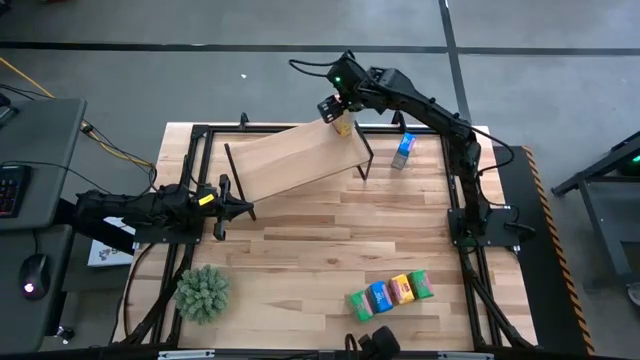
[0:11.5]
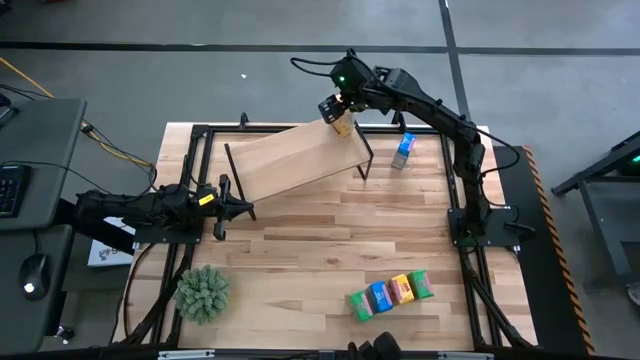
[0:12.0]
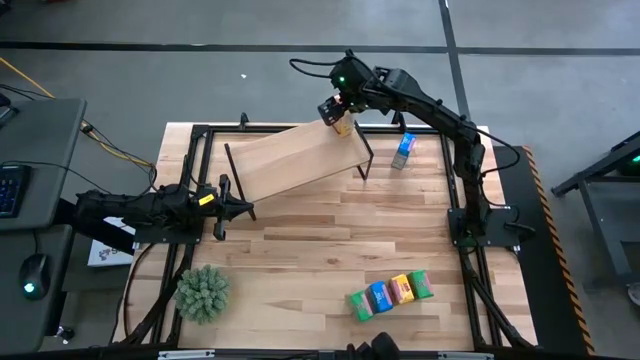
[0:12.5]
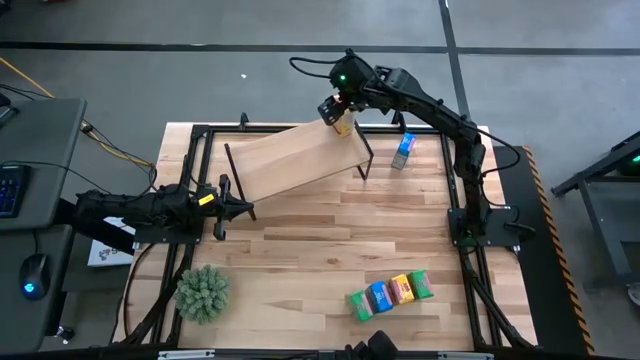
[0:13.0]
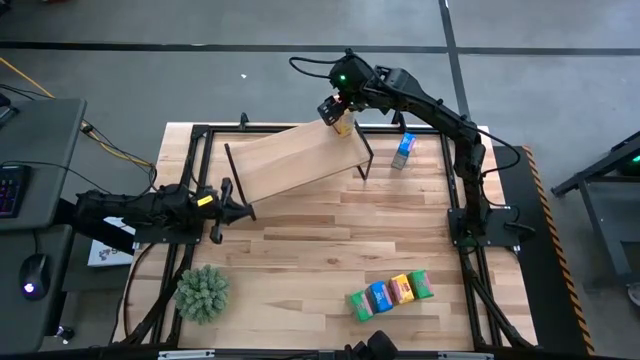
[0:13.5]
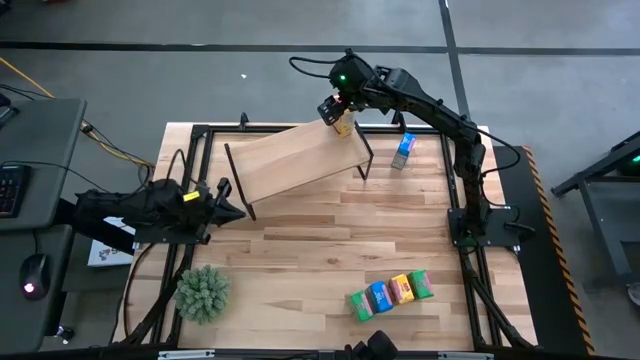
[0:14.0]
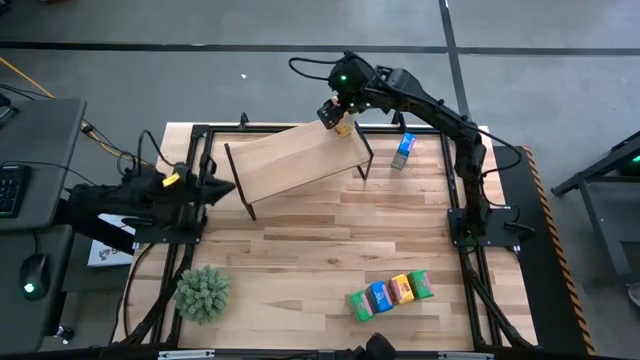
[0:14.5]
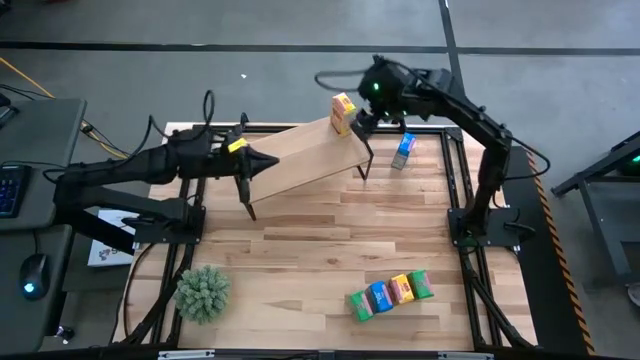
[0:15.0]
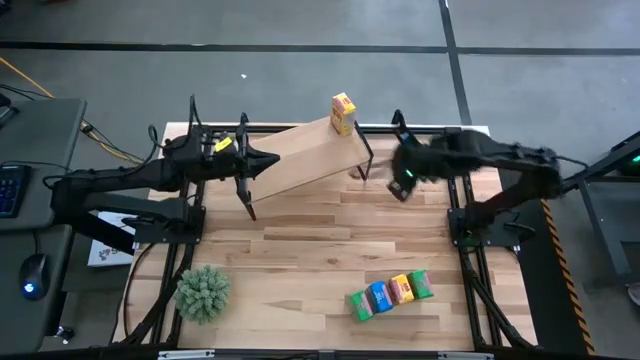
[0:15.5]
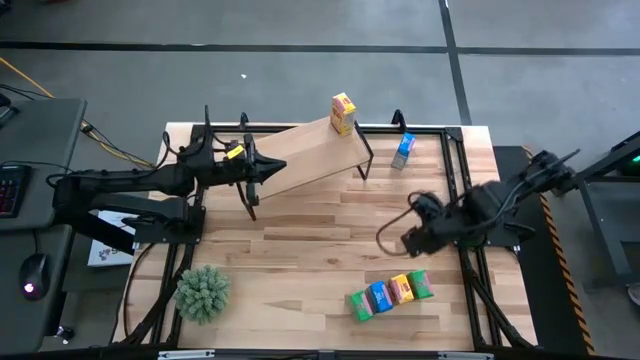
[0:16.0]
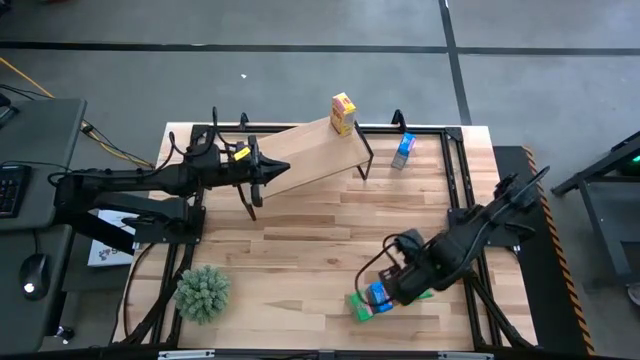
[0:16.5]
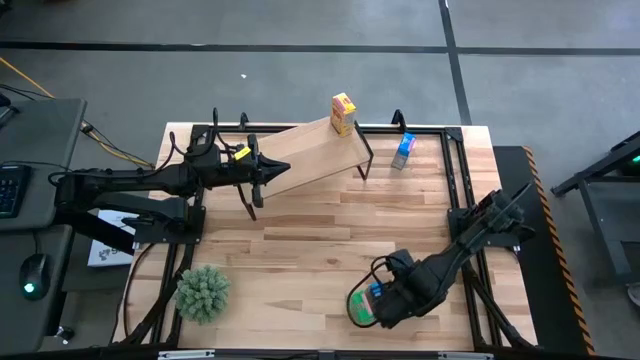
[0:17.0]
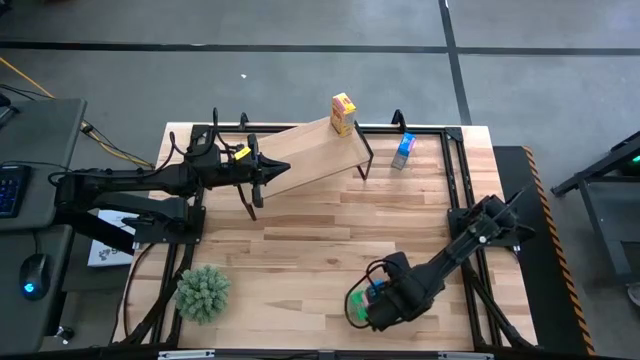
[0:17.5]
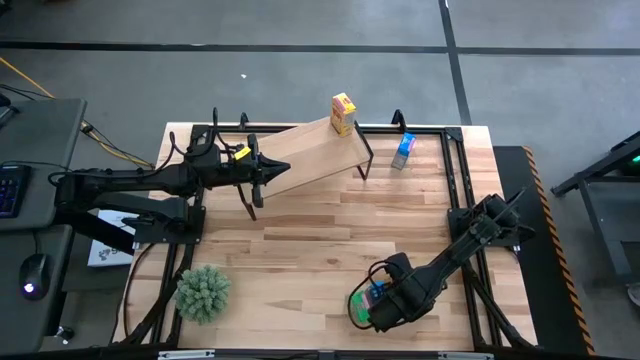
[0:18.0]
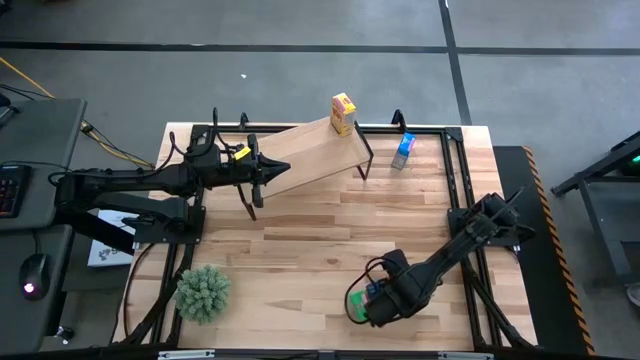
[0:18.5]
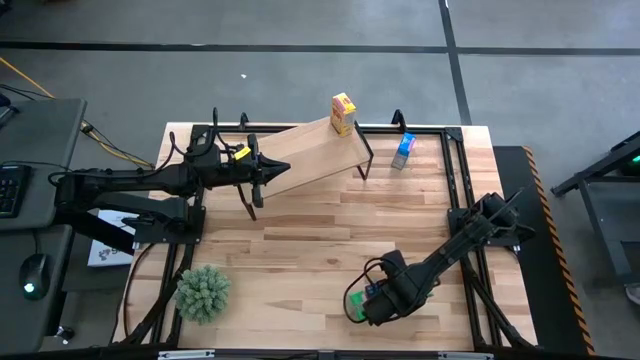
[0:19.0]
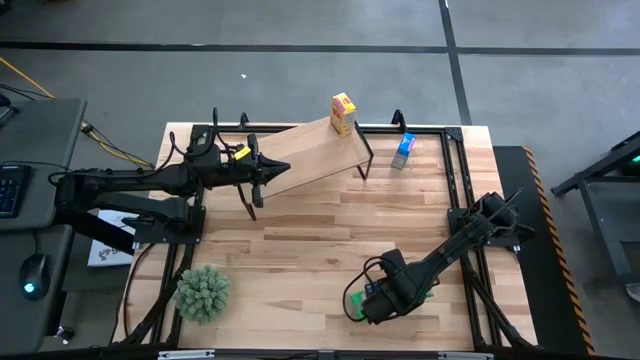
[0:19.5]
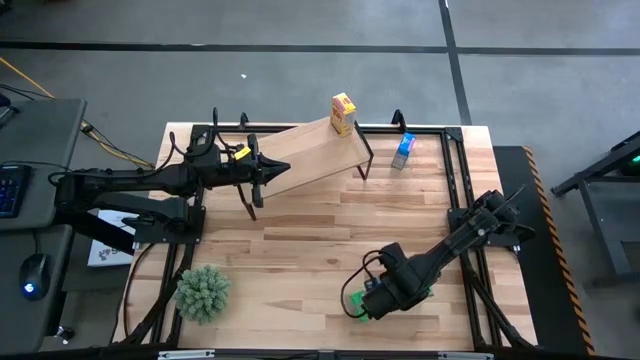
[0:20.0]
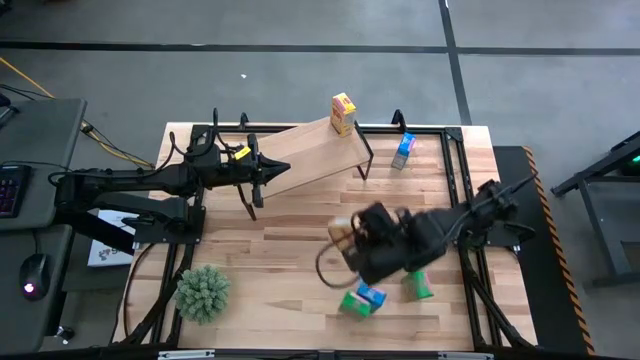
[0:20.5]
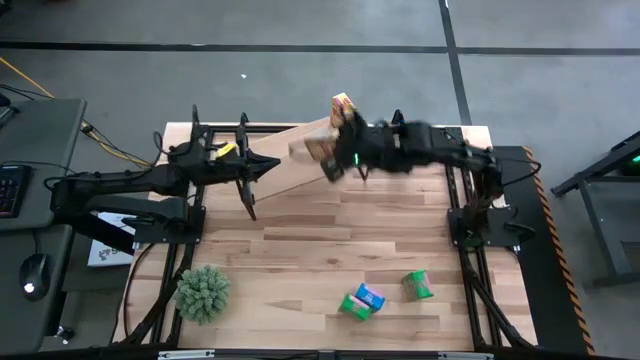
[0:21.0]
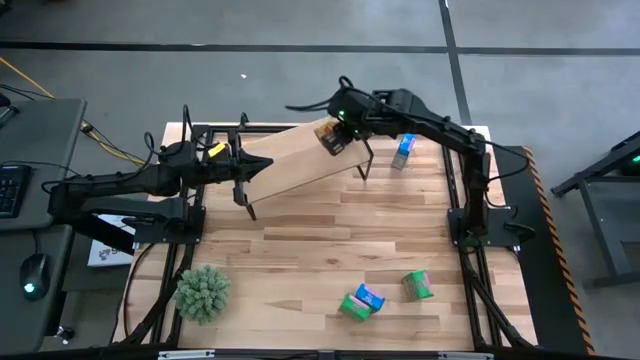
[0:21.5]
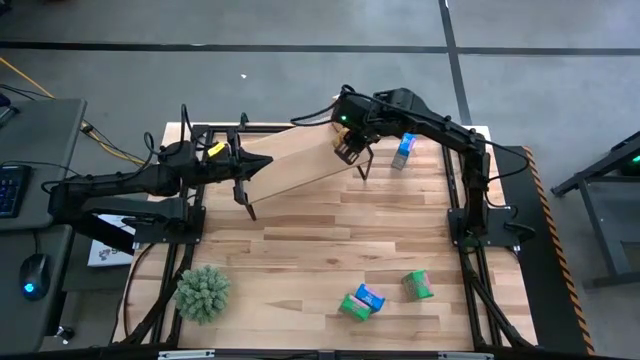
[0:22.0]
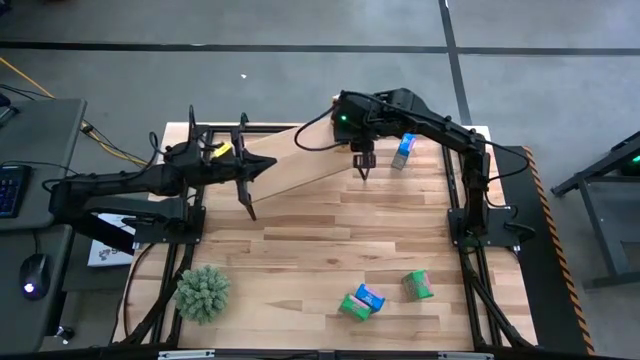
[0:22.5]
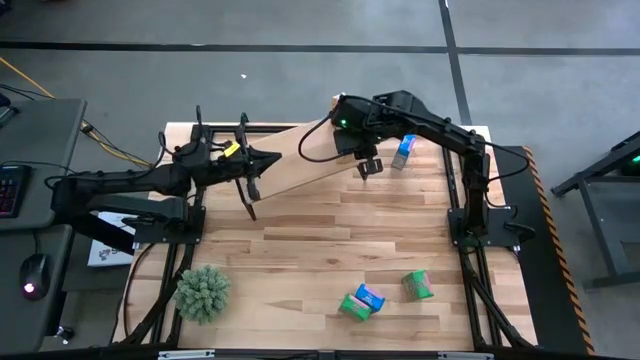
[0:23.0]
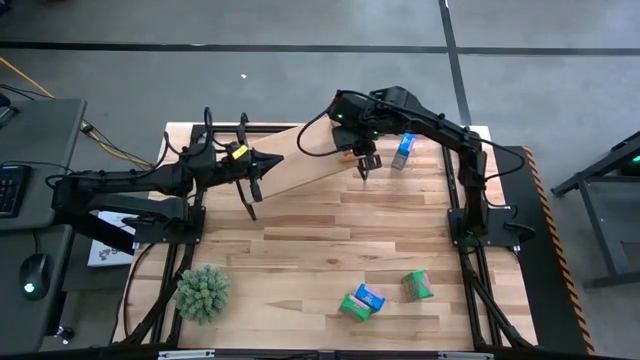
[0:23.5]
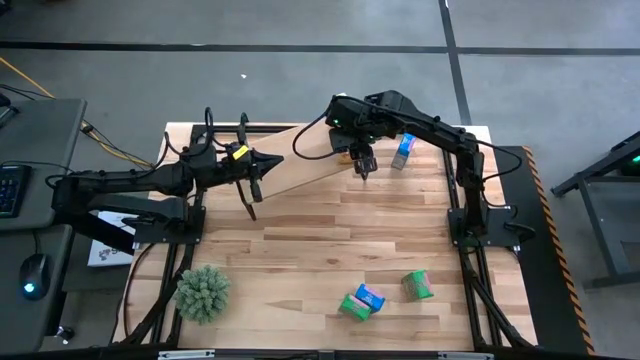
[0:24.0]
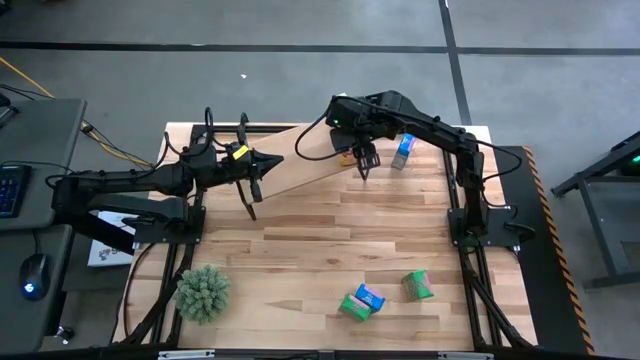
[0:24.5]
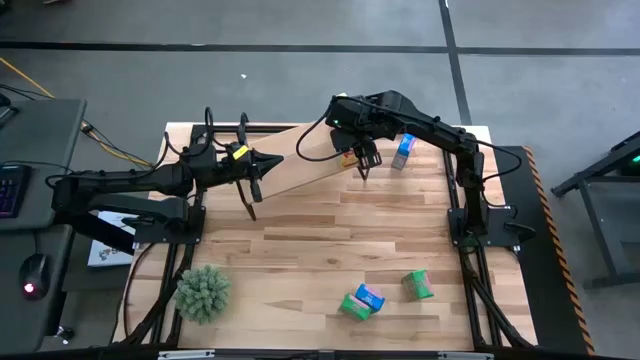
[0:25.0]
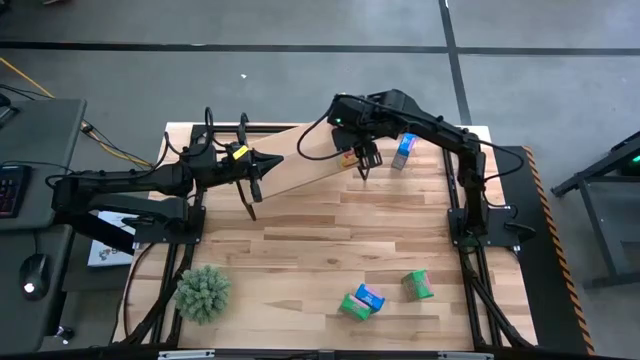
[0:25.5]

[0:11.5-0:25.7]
Task: Stack cereal on shelf
Put the yellow cereal box on the shelf aligned with the yellow cereal

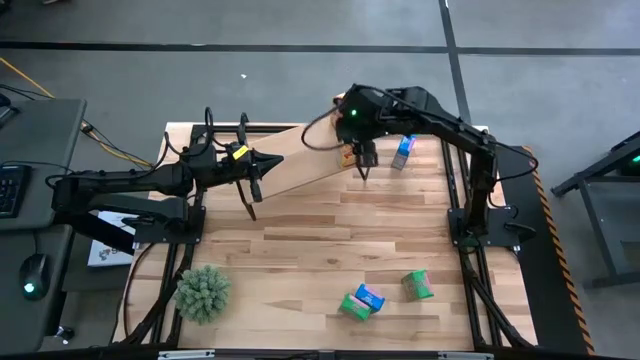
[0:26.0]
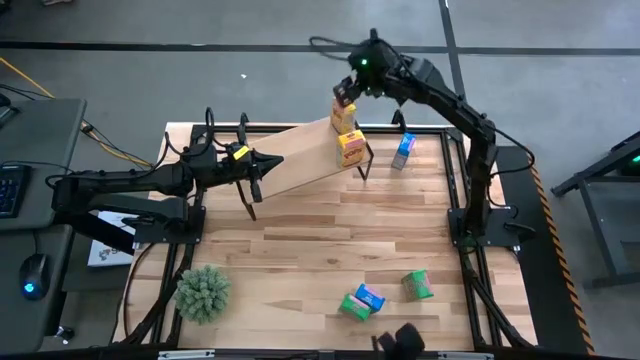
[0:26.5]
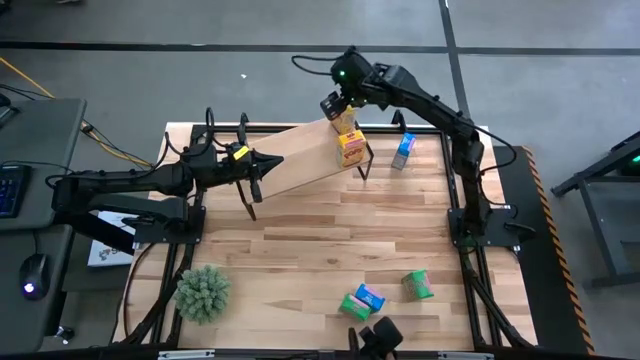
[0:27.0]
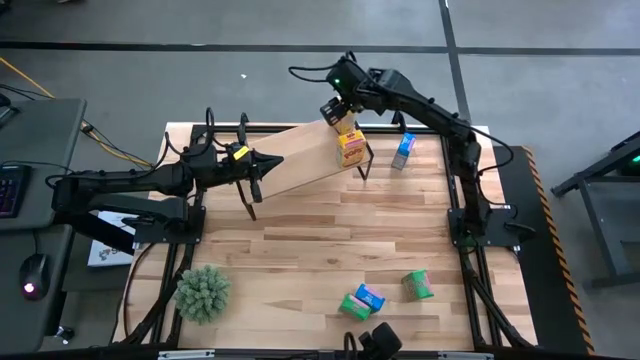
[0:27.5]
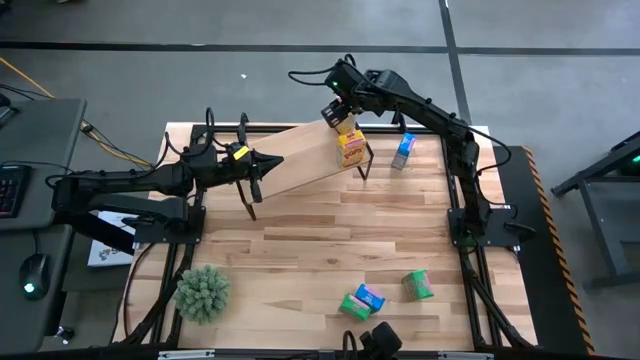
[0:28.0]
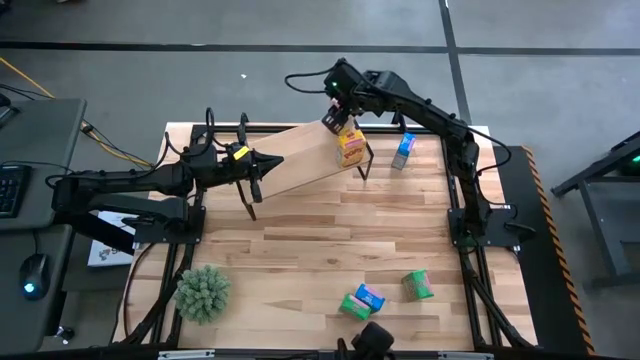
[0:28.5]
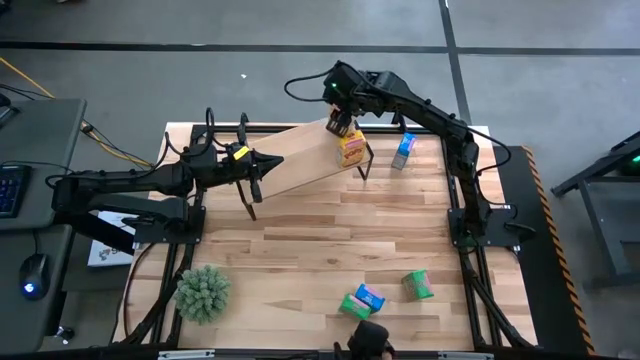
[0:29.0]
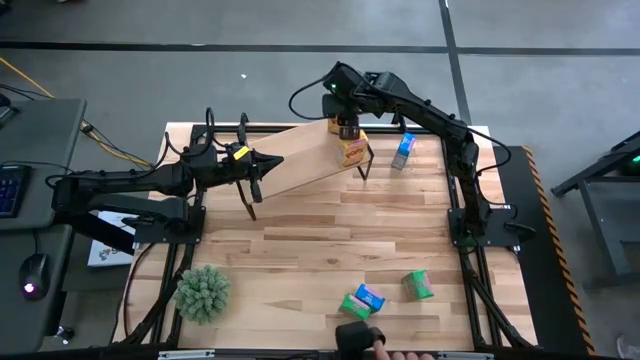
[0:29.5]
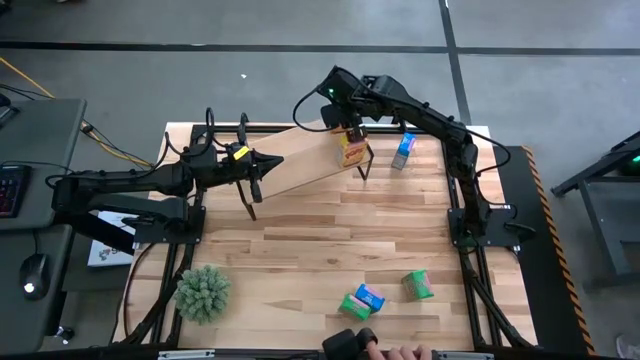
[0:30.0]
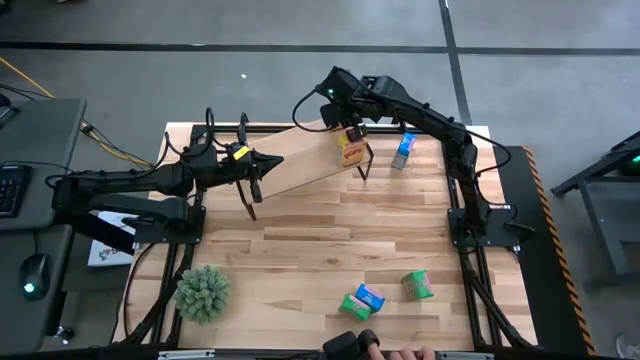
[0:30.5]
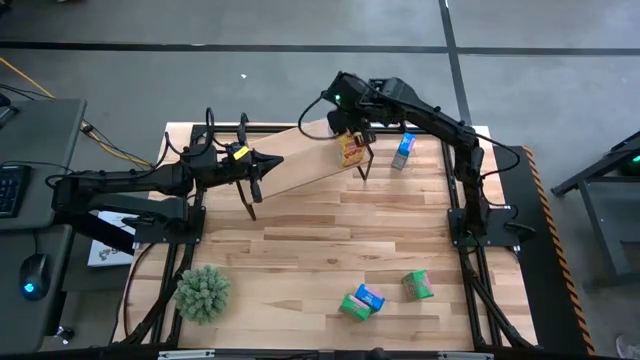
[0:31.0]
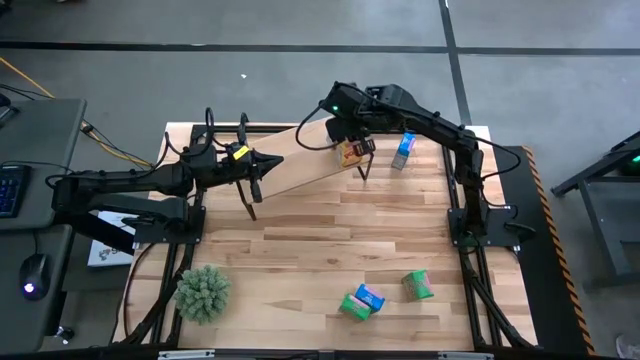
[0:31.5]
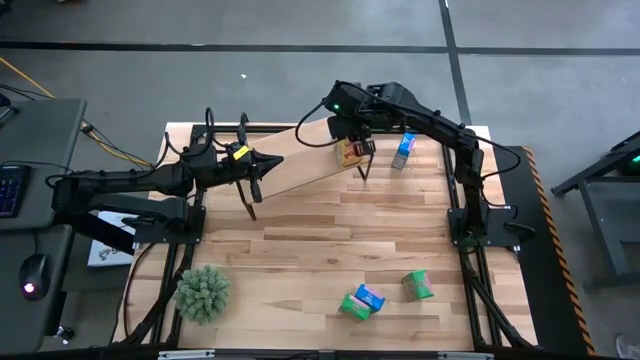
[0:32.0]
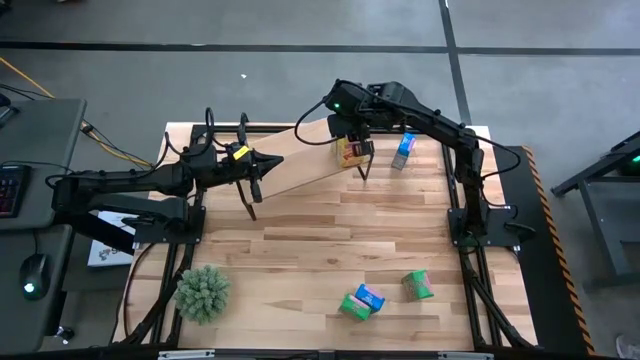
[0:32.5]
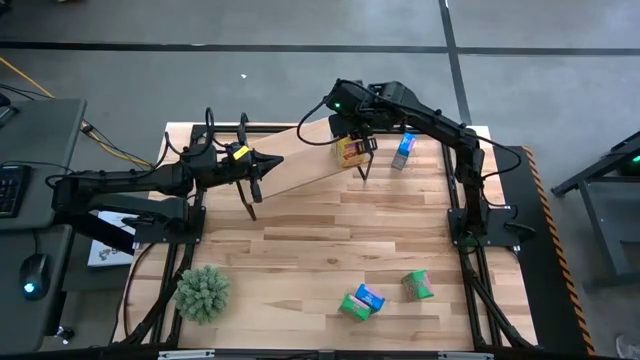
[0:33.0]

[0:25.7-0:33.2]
Adjust the yellow cereal boxes on the shelf
